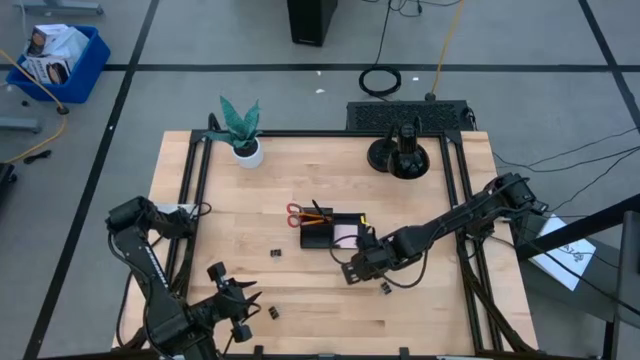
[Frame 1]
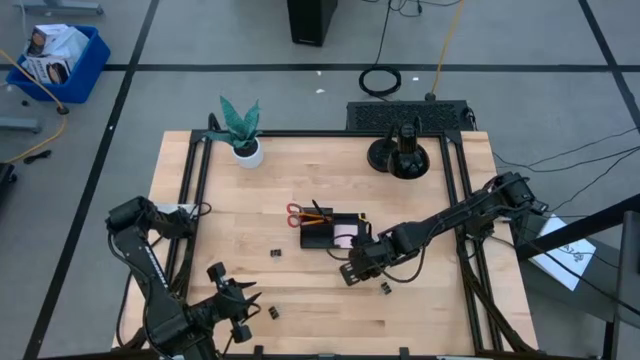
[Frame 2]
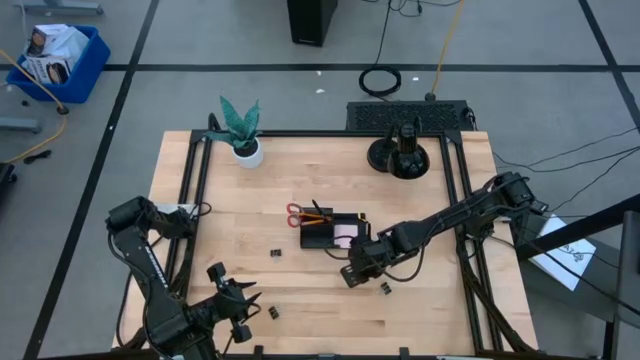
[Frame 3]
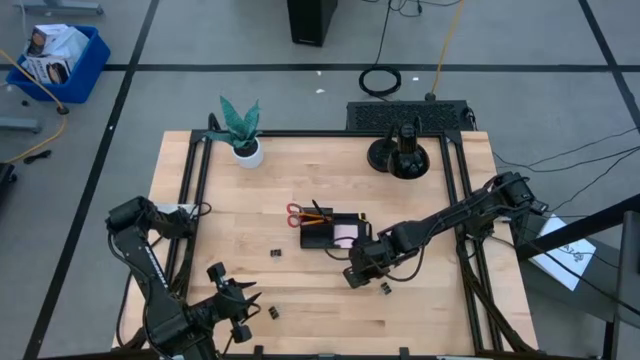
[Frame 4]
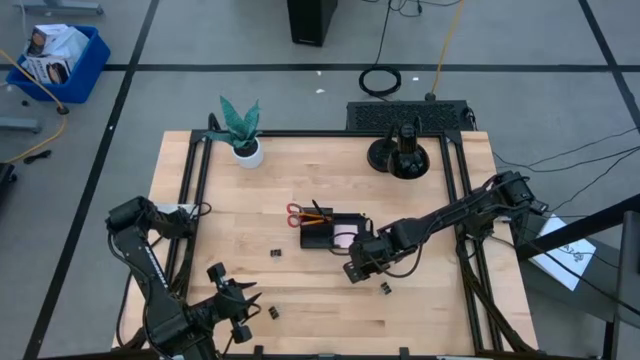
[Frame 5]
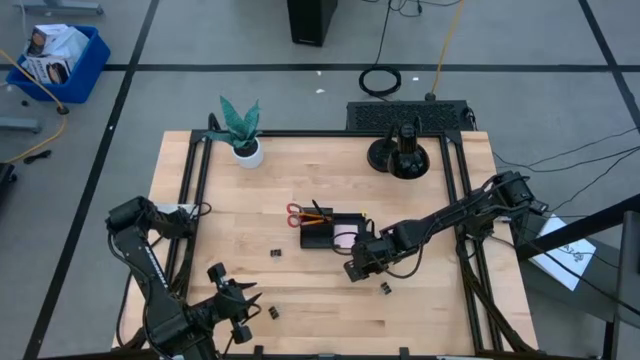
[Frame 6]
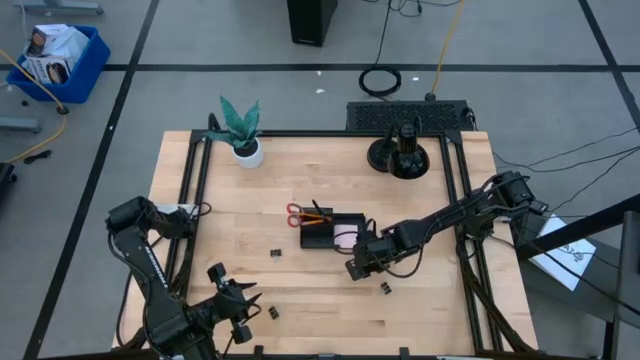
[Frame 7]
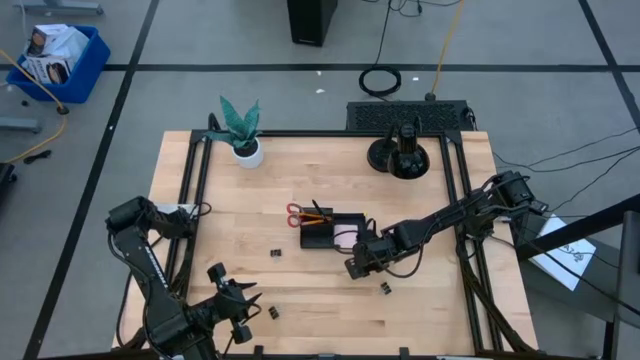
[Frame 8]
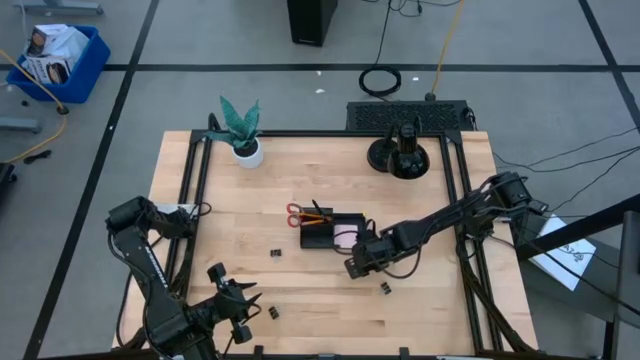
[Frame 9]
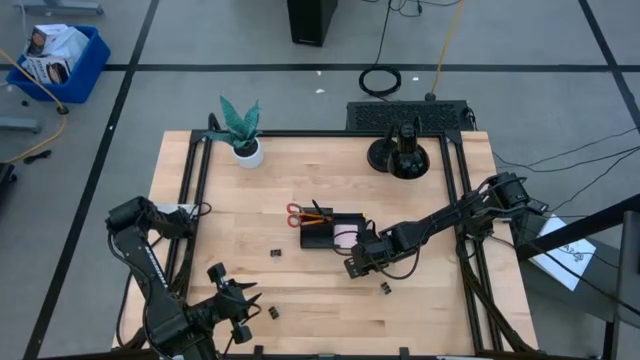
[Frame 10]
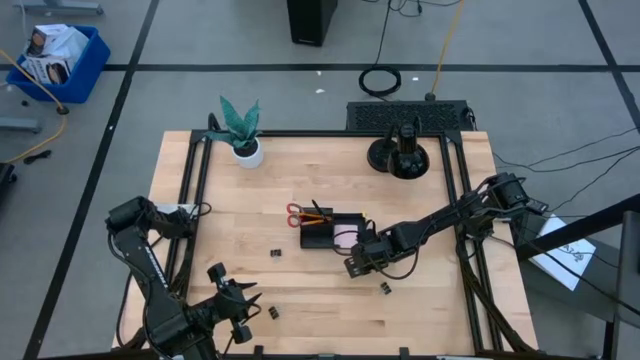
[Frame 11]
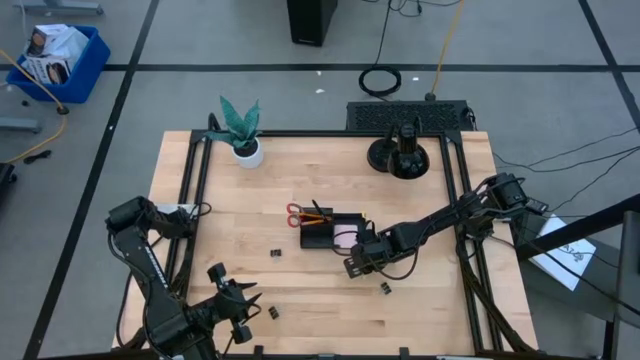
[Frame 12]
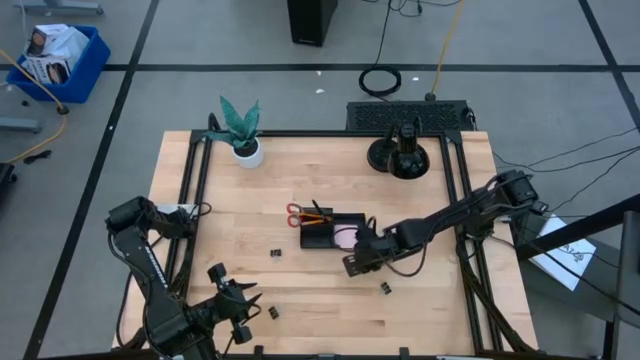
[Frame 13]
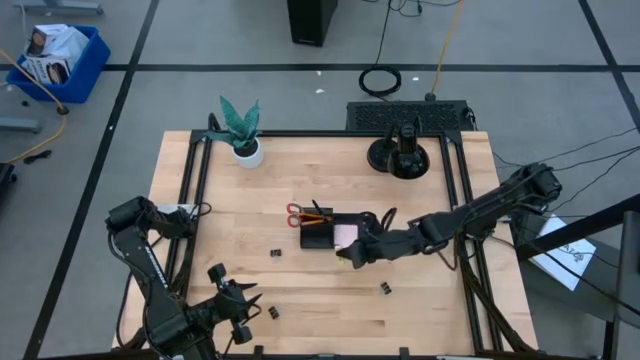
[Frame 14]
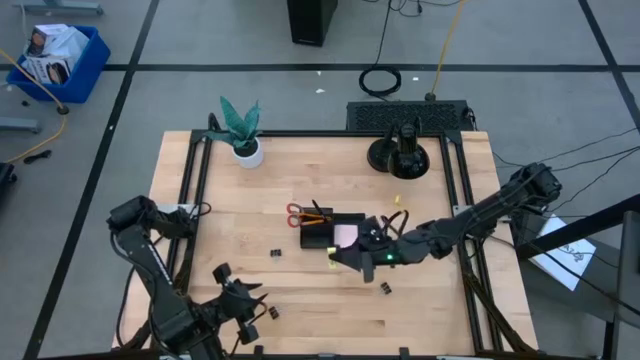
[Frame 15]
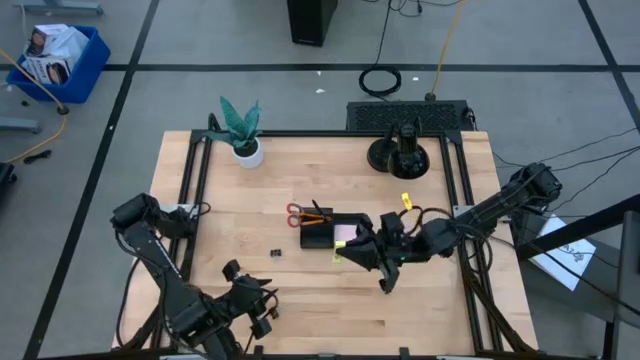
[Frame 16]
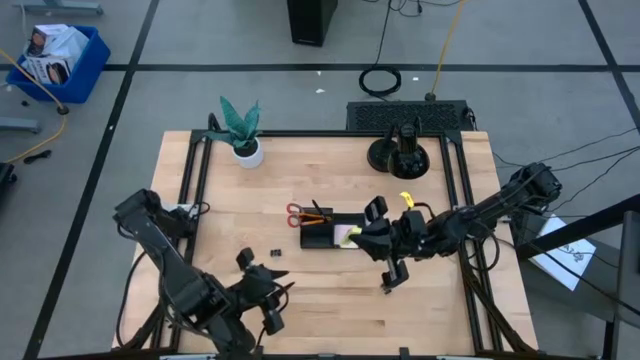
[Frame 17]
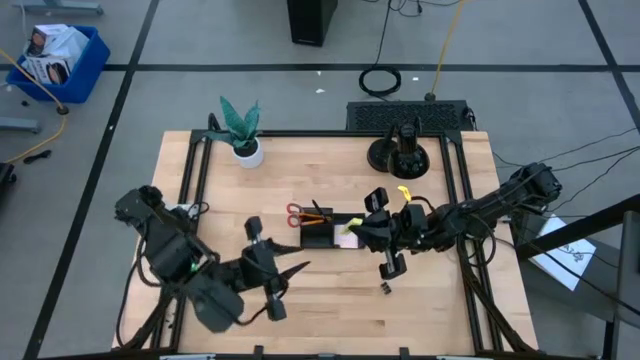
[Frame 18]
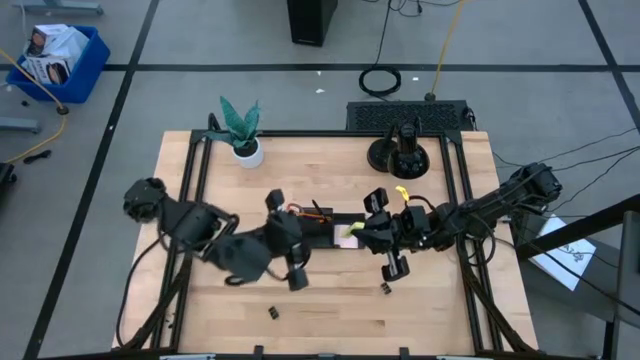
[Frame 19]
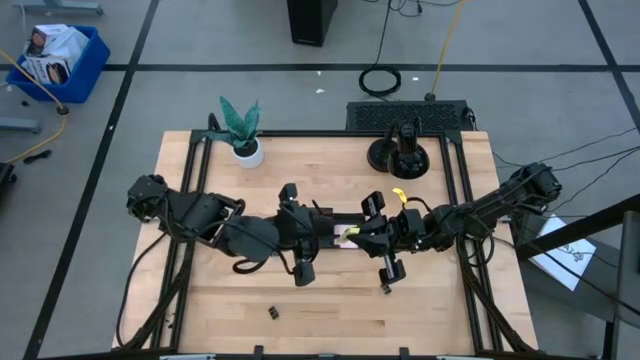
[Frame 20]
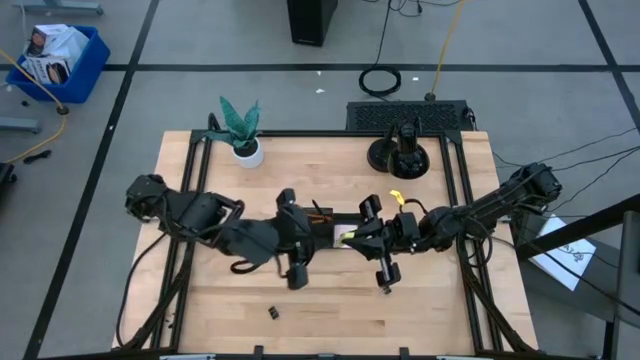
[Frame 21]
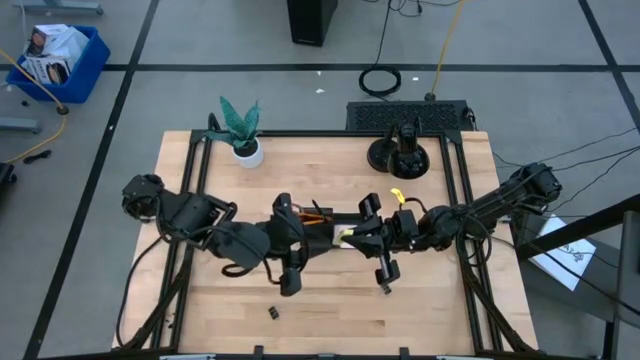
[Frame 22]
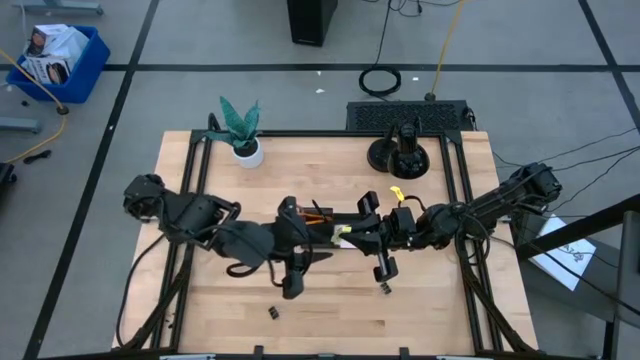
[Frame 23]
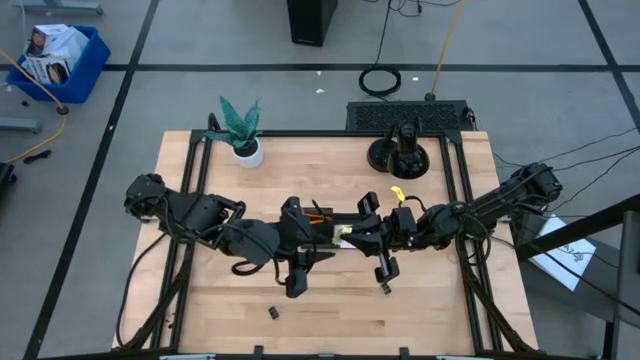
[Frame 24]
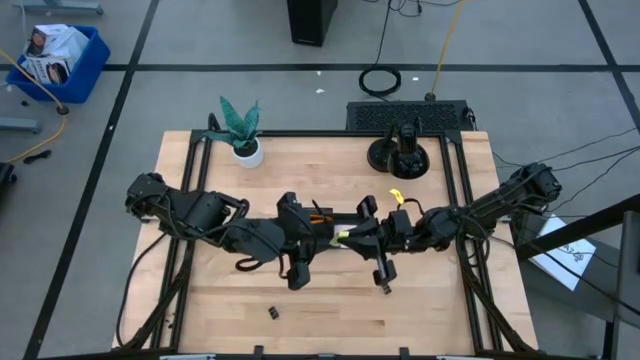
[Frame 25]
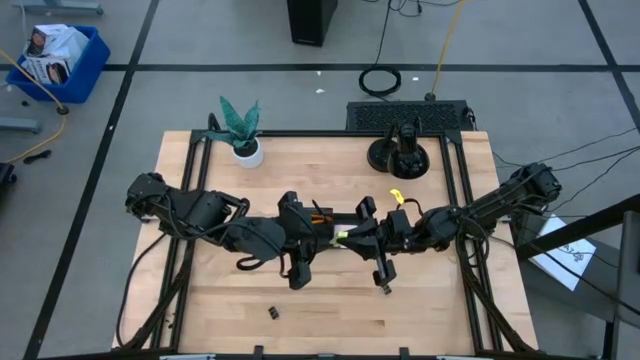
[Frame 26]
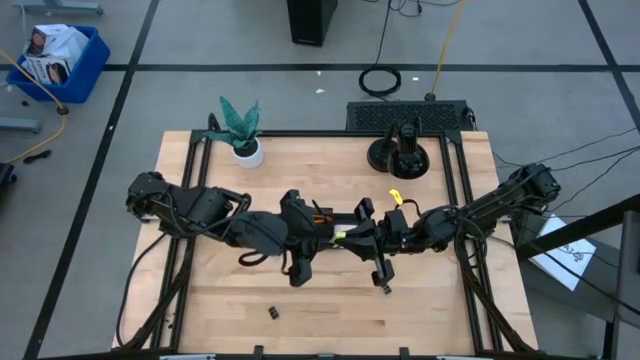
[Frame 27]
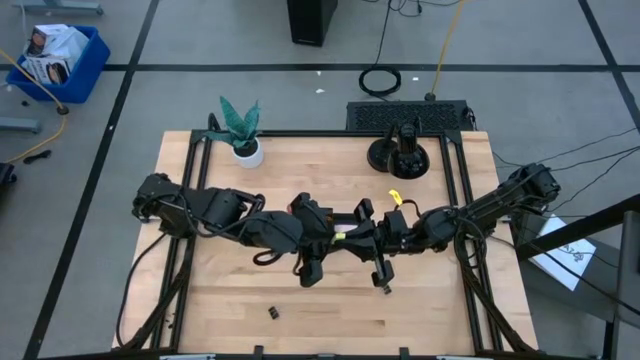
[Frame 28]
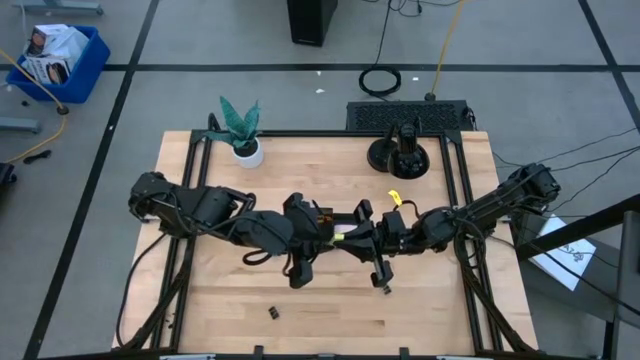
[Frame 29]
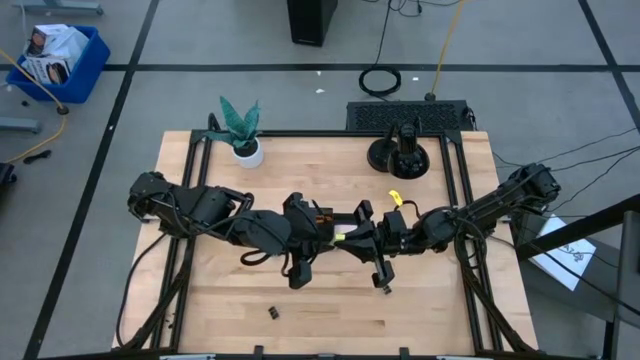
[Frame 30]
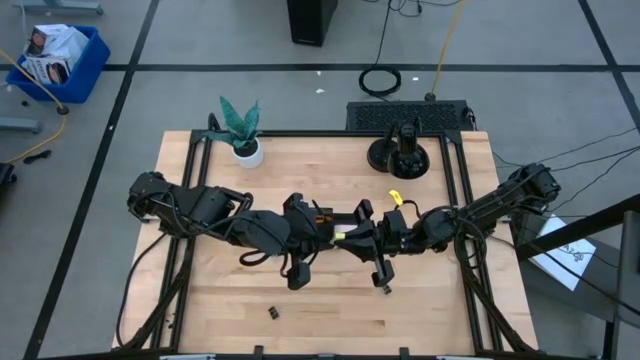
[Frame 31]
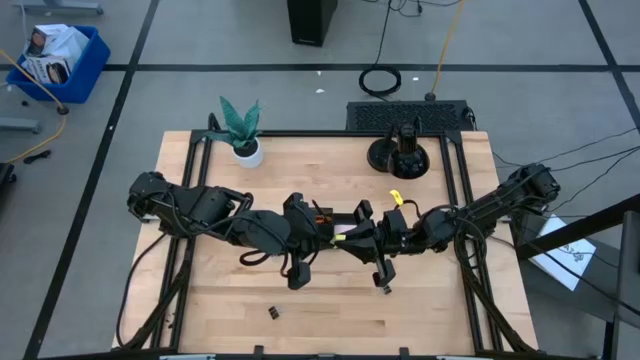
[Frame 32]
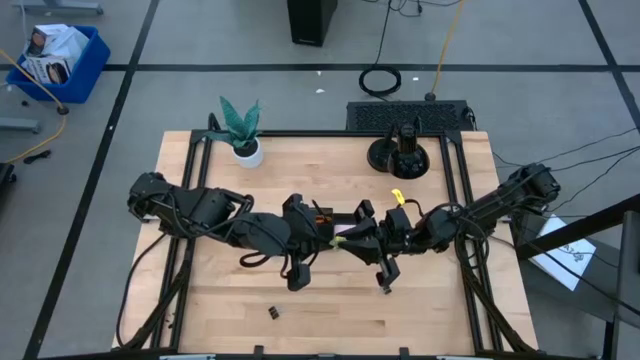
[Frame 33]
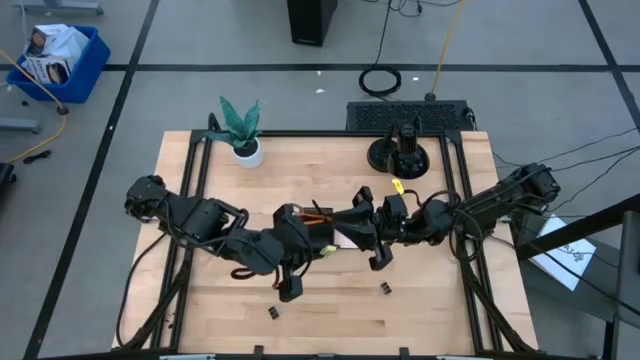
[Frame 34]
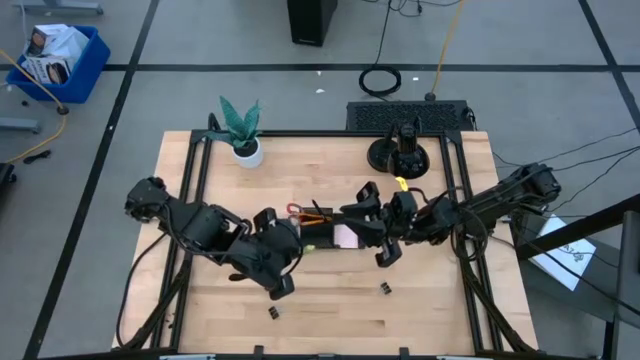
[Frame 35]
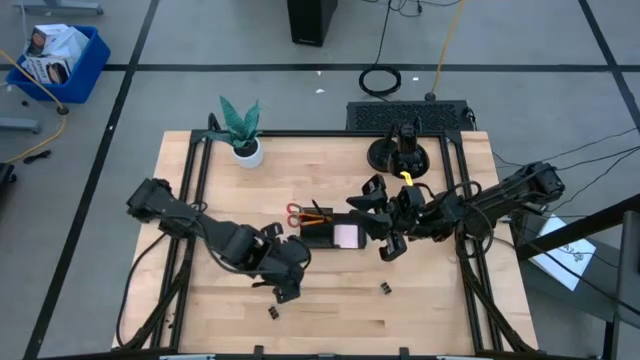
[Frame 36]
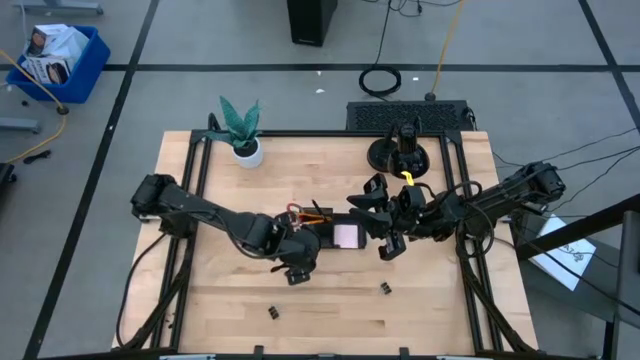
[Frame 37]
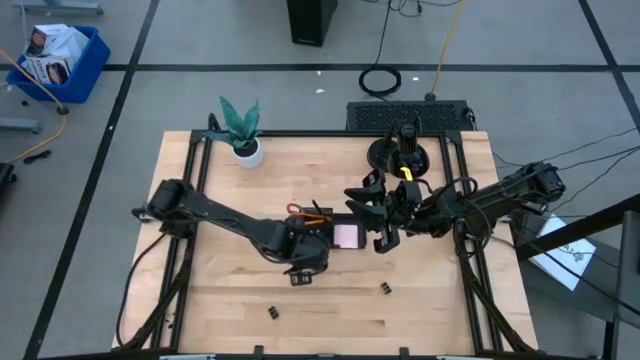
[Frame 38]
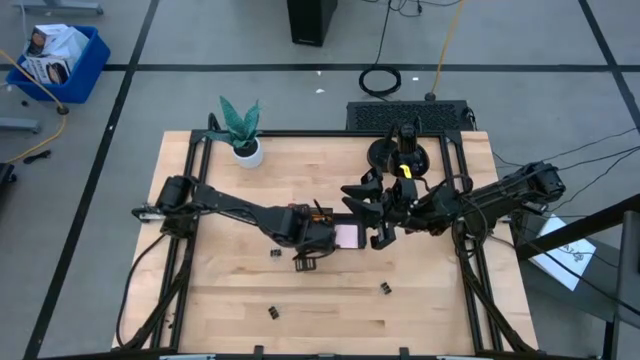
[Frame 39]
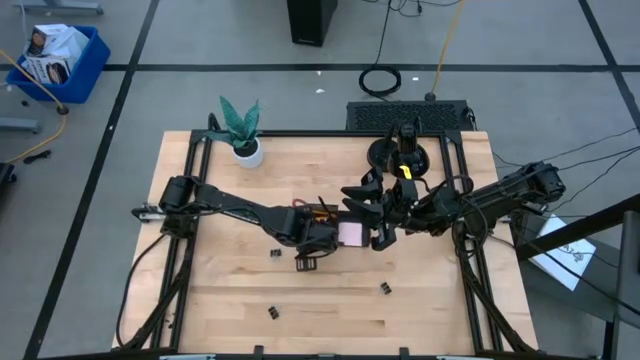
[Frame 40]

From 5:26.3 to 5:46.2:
Task: Pick and place office supplies into organizer
Put the green eraser into the desk organizer
